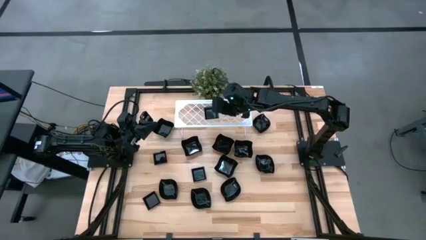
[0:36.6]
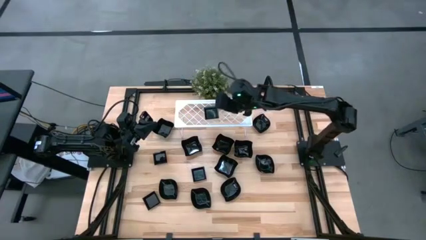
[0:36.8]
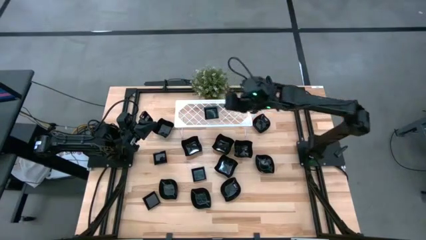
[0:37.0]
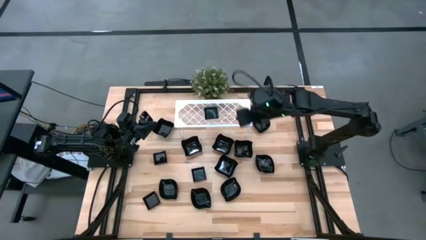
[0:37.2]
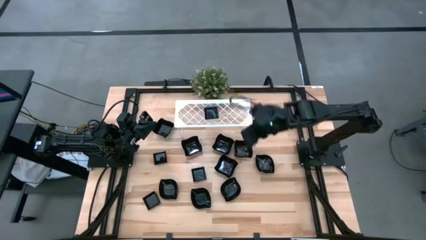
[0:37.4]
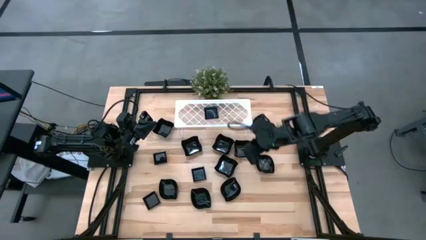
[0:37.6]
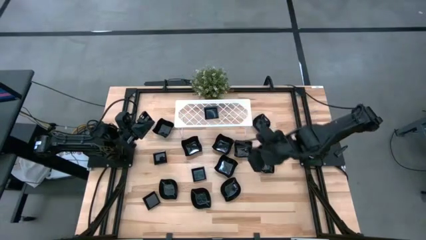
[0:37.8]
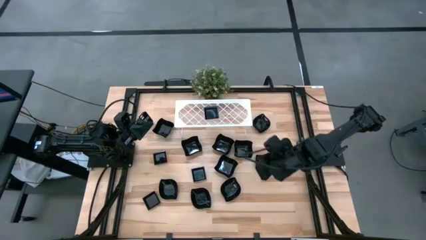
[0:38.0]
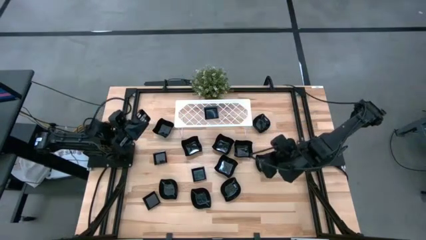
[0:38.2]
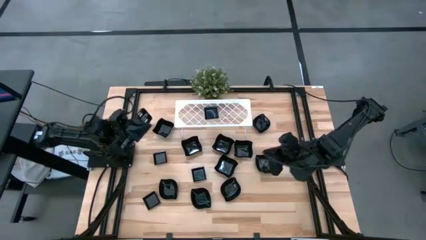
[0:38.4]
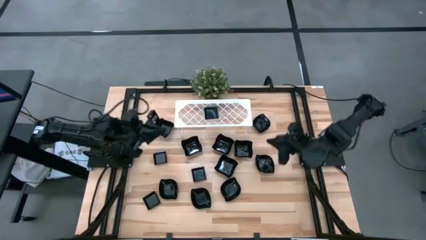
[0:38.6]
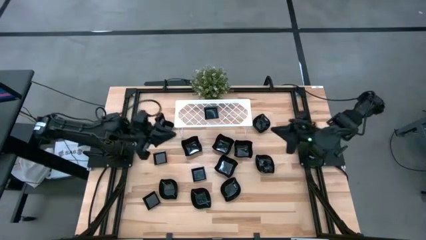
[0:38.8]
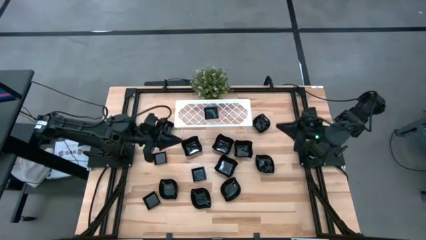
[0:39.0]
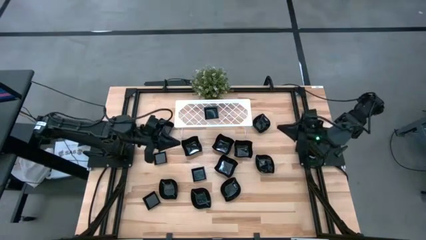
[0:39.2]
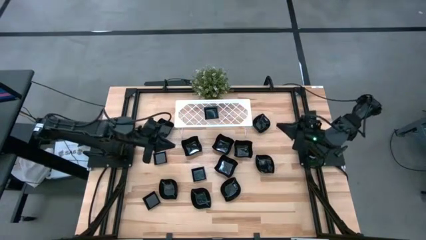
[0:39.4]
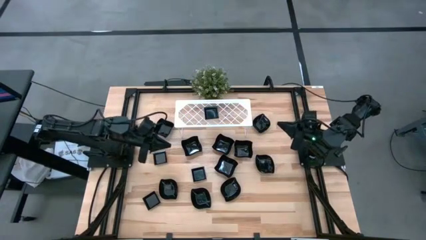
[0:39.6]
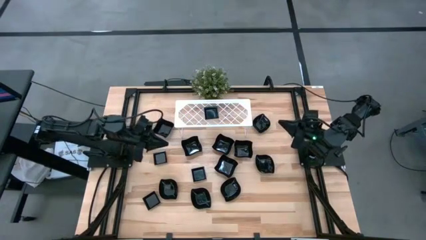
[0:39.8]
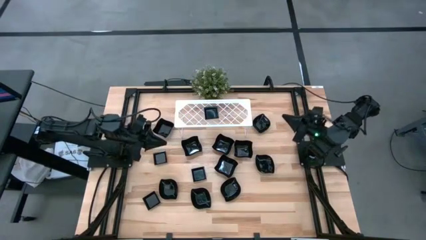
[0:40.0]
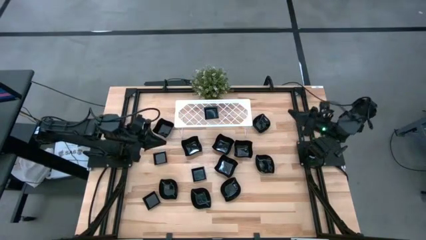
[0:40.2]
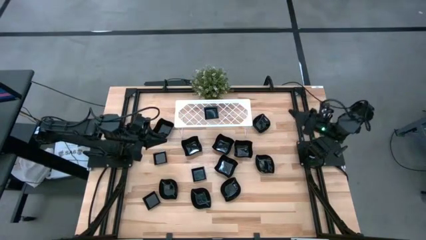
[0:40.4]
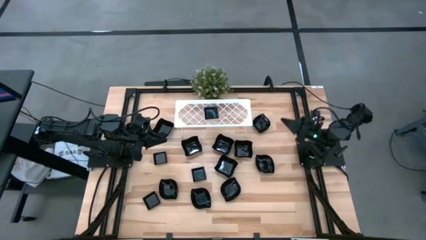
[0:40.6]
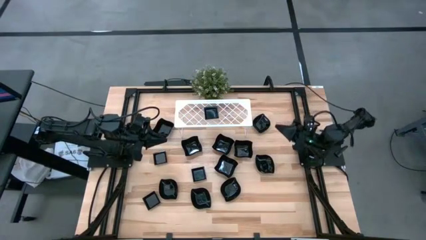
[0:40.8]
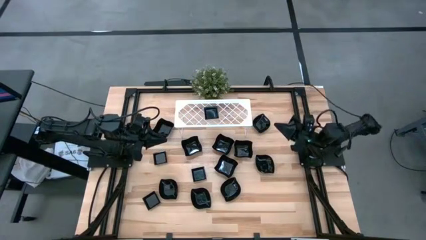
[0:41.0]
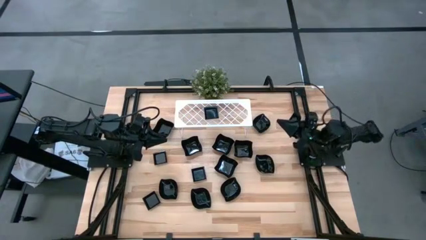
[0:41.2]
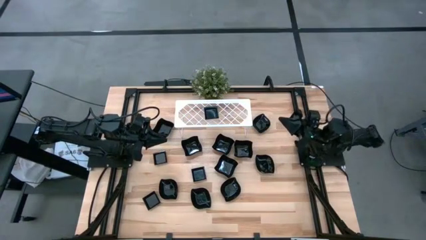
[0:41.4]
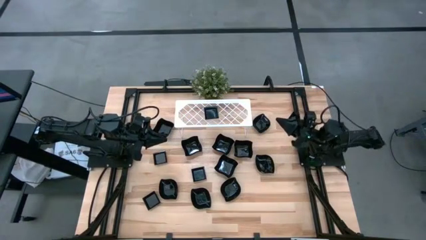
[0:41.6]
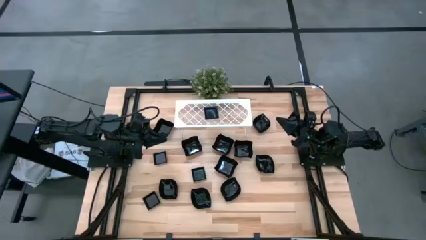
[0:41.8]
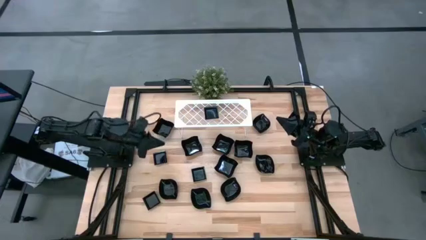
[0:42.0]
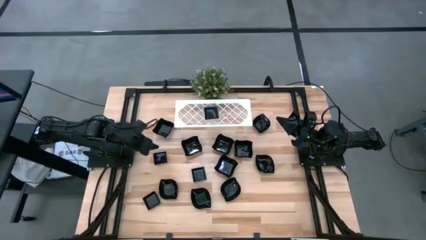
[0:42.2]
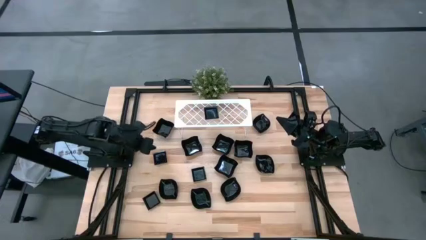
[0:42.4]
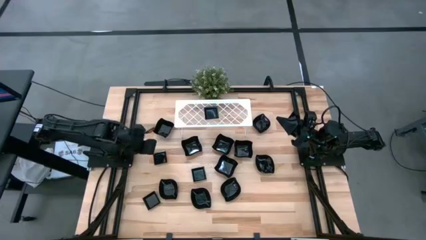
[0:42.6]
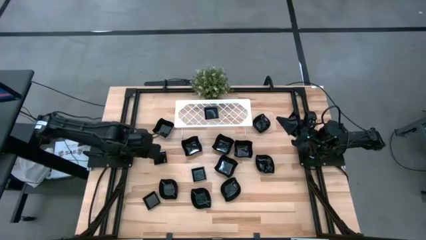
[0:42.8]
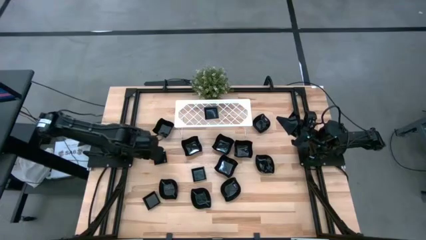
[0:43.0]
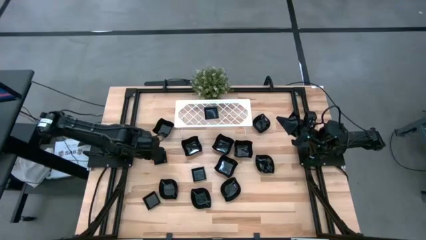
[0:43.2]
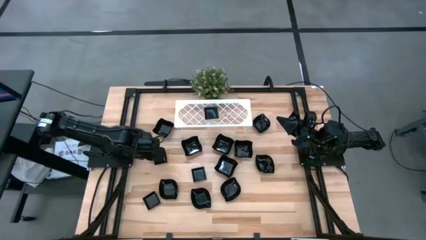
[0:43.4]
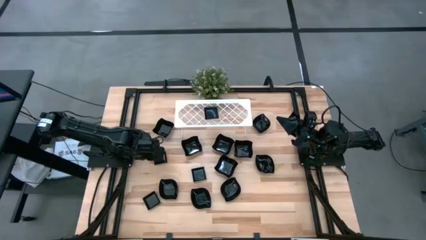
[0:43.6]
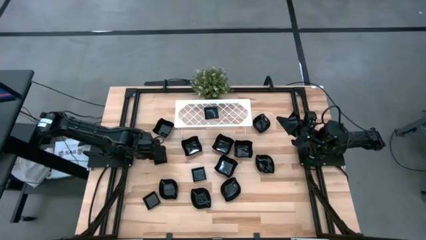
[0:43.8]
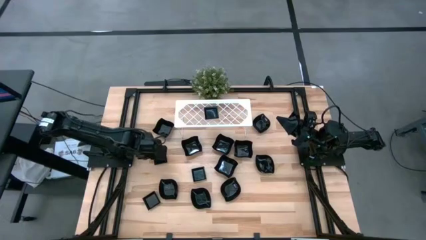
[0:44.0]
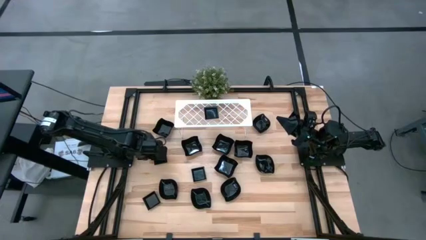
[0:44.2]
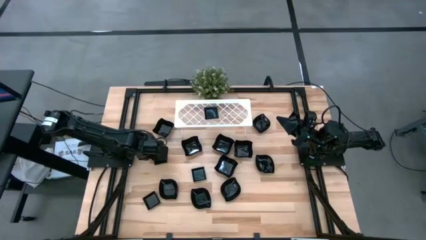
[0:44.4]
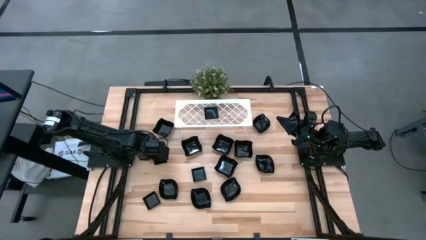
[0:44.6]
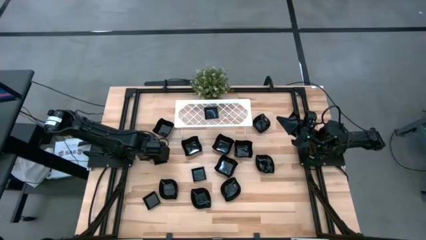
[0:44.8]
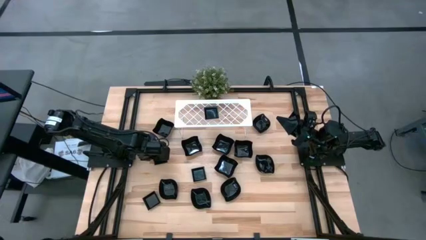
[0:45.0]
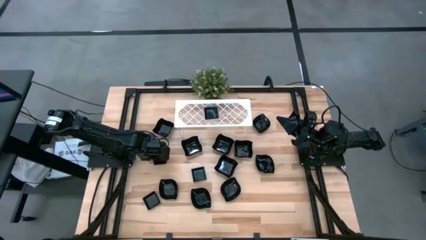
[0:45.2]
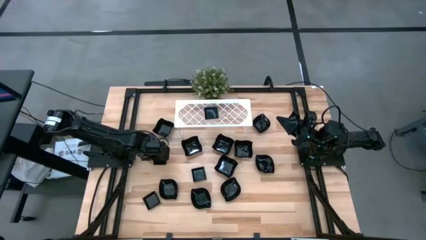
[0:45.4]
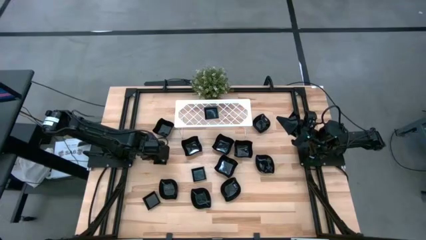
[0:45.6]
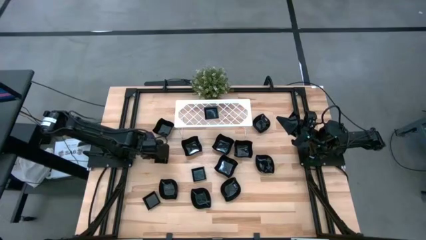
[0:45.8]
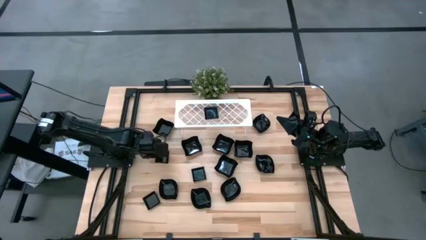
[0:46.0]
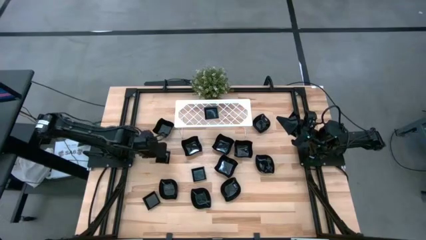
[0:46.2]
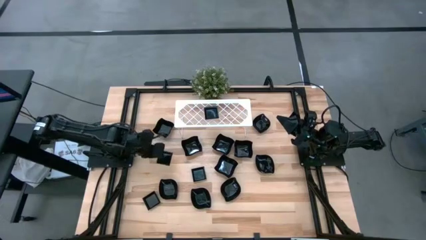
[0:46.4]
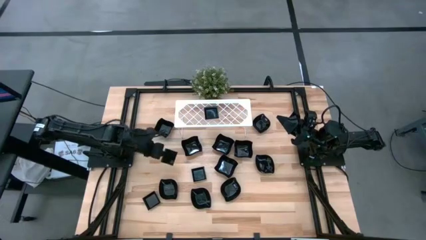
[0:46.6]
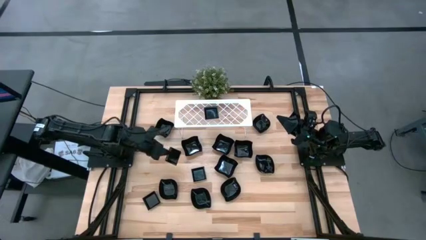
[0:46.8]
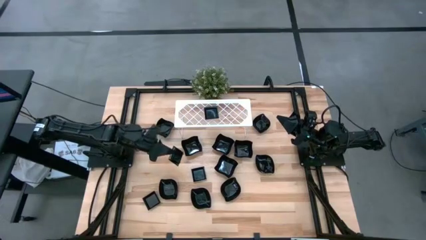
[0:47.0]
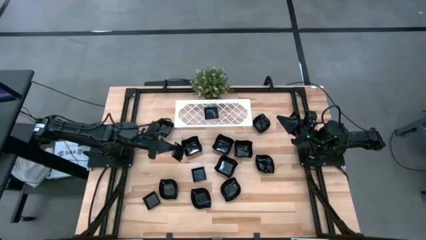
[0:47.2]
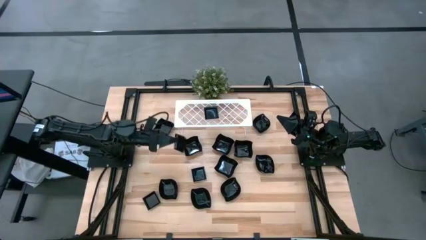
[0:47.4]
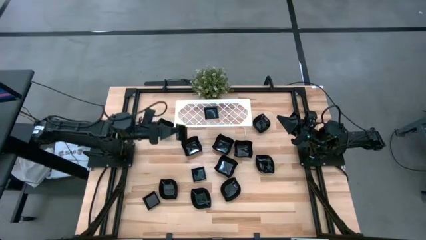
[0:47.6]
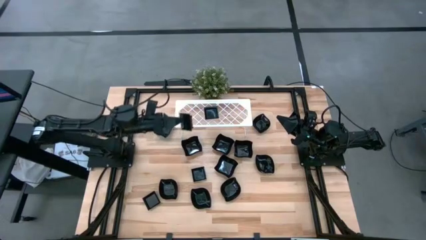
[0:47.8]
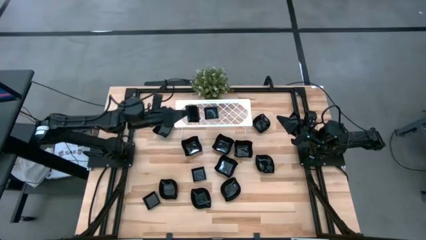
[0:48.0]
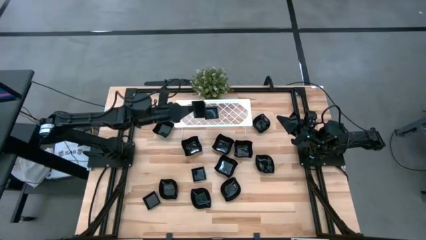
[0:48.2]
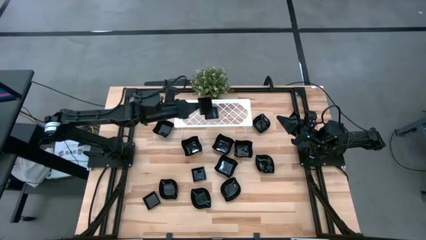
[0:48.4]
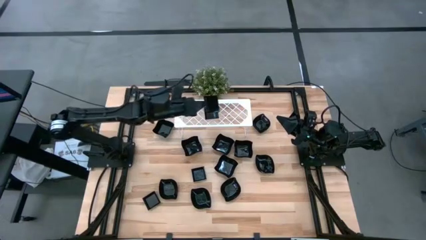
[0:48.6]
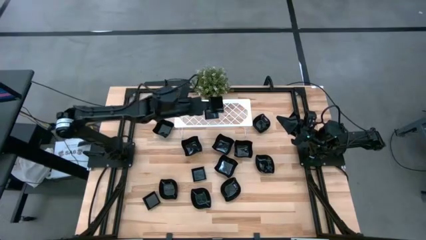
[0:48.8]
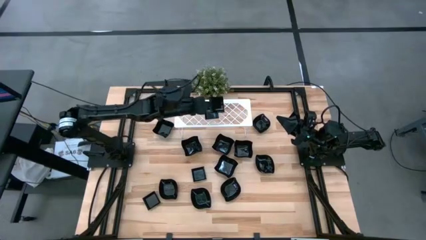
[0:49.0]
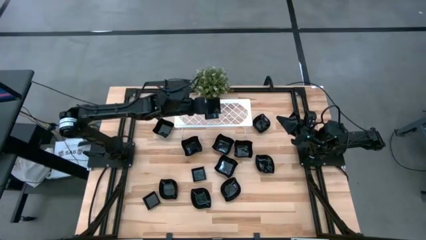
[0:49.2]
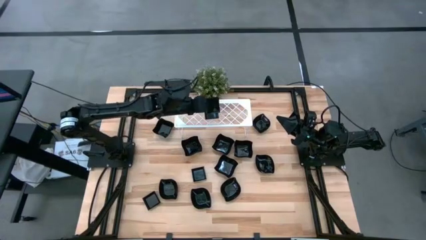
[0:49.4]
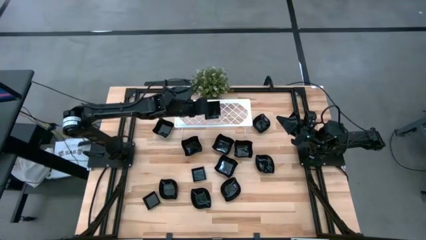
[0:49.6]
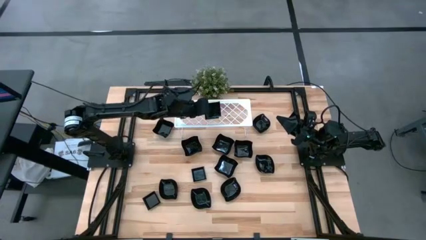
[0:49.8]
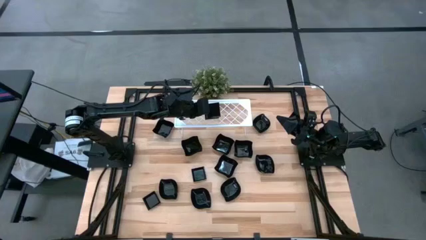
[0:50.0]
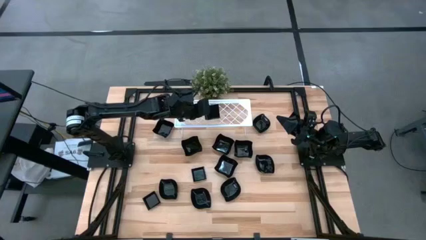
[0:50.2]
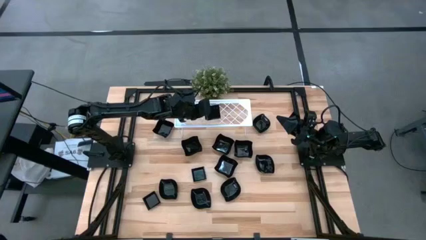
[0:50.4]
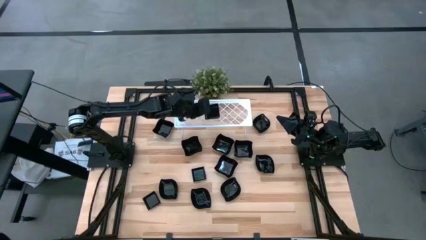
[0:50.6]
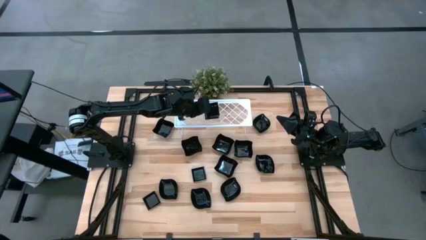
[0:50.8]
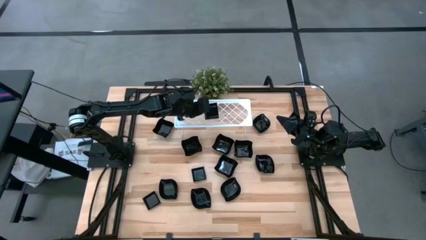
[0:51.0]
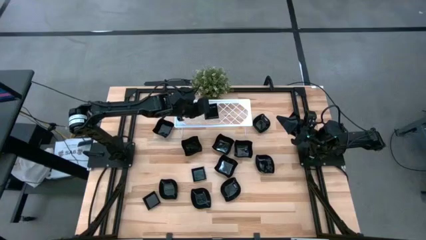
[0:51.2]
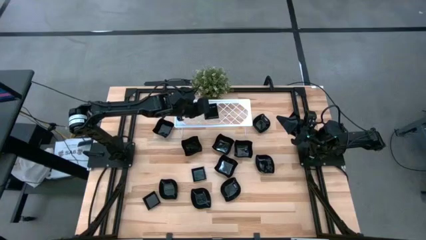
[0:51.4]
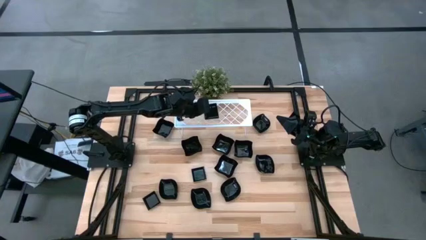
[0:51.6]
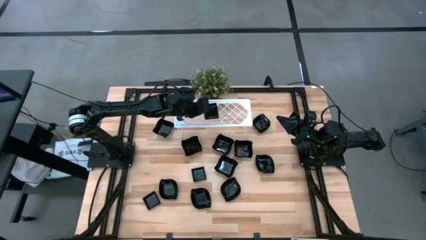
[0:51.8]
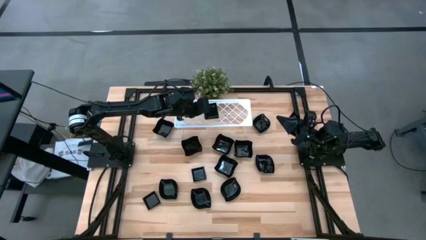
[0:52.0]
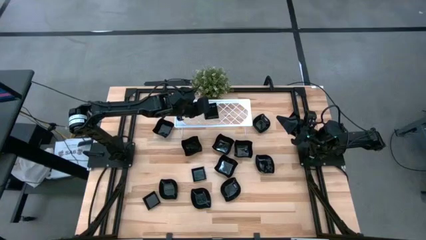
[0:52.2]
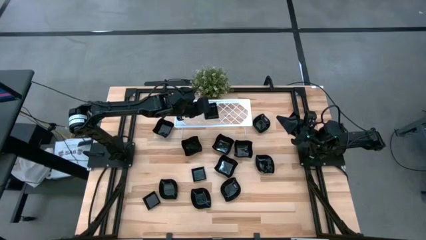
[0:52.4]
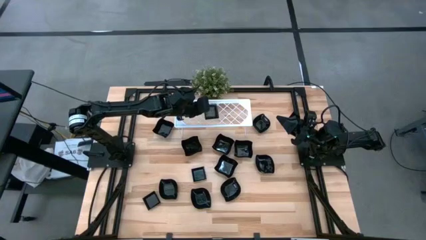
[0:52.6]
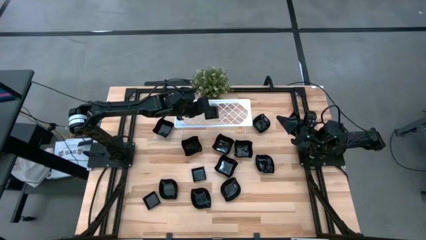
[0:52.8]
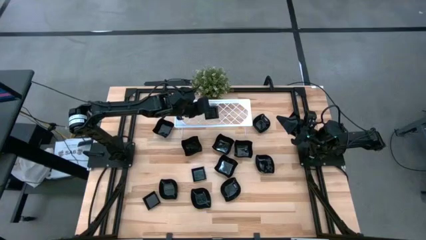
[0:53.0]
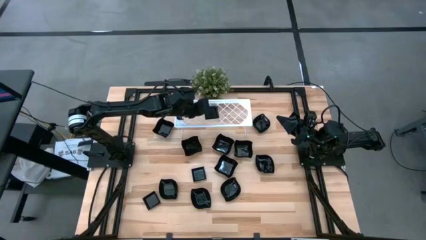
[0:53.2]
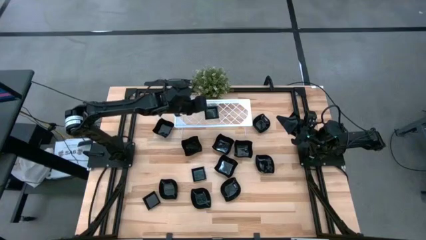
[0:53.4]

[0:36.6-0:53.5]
Task: Pick & Place Mini shaped plates
Stack the top square plate on top of the stacked square plate on the shelf
